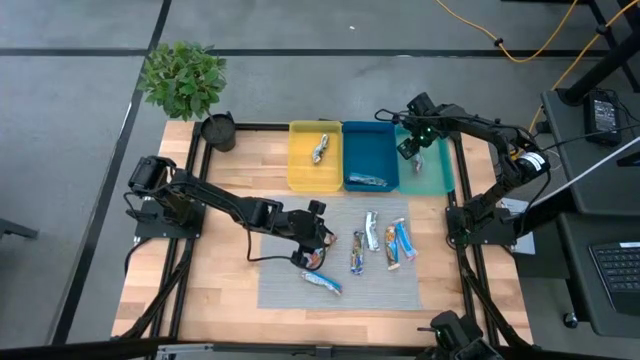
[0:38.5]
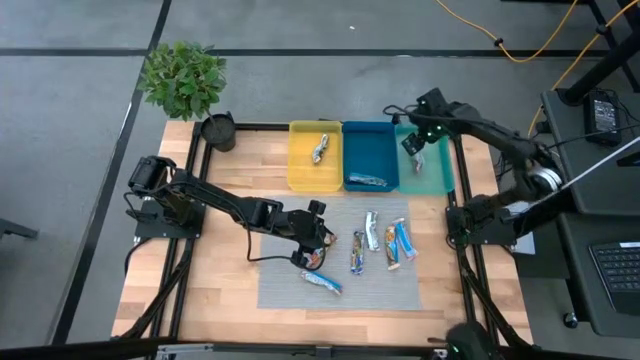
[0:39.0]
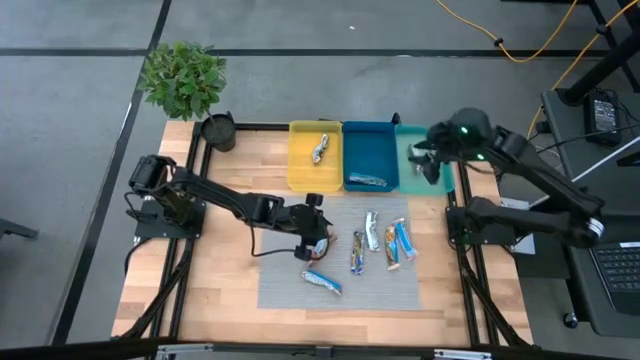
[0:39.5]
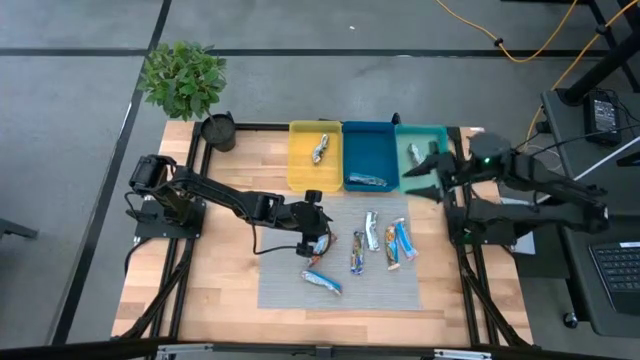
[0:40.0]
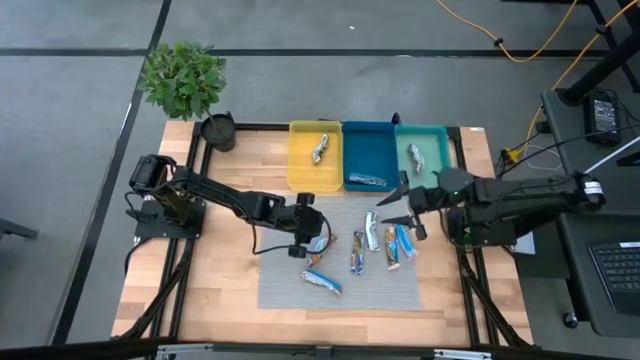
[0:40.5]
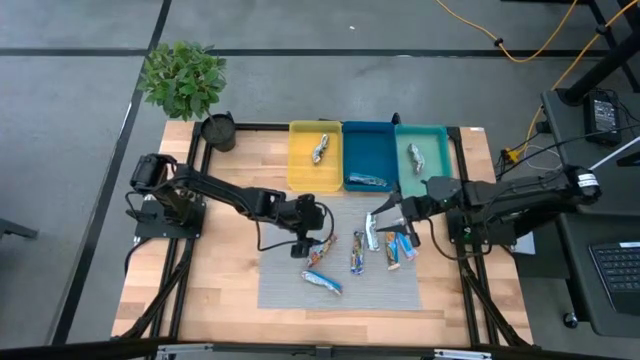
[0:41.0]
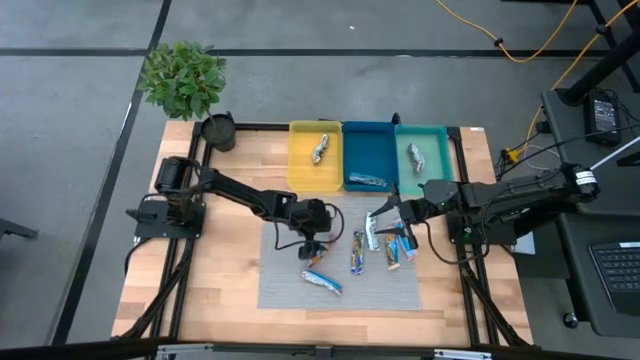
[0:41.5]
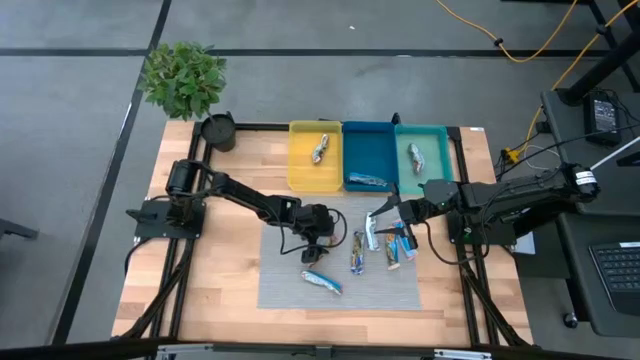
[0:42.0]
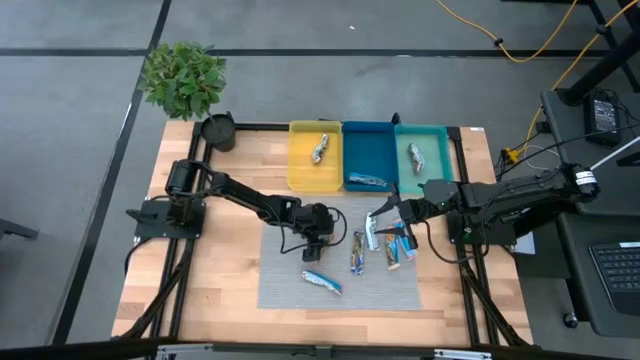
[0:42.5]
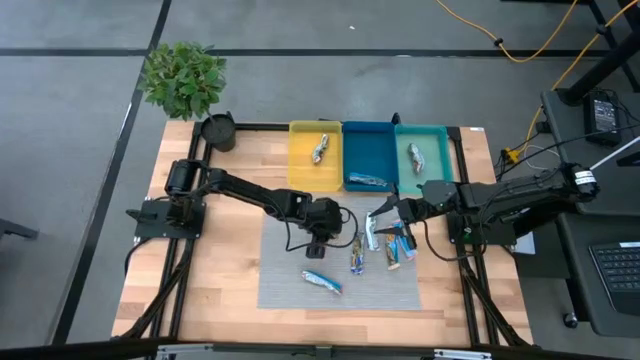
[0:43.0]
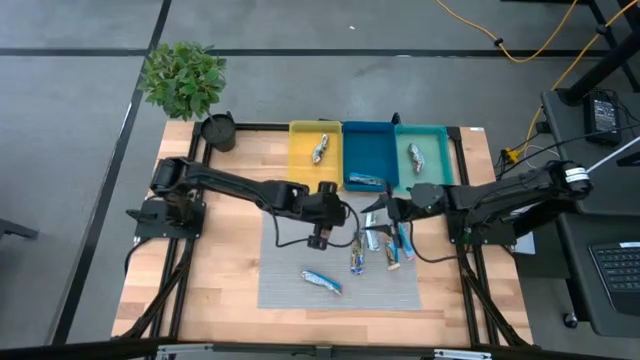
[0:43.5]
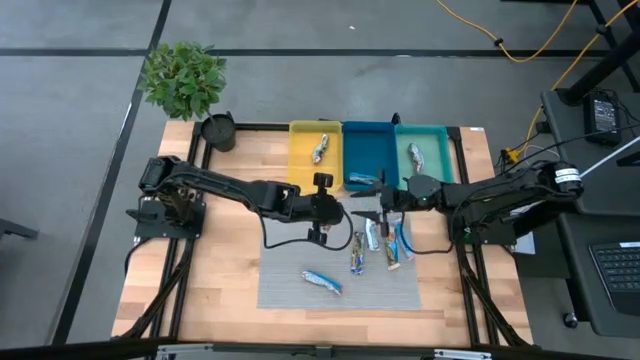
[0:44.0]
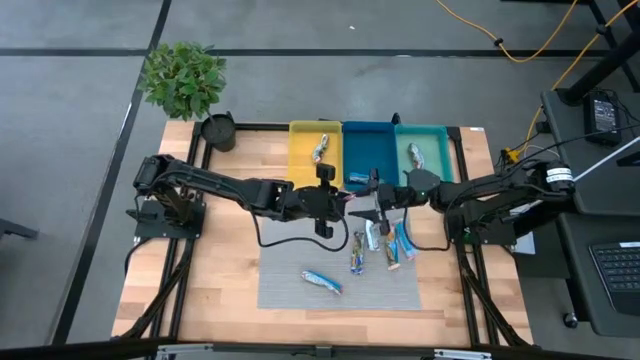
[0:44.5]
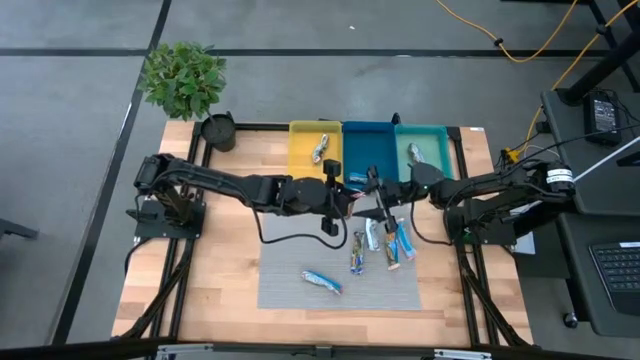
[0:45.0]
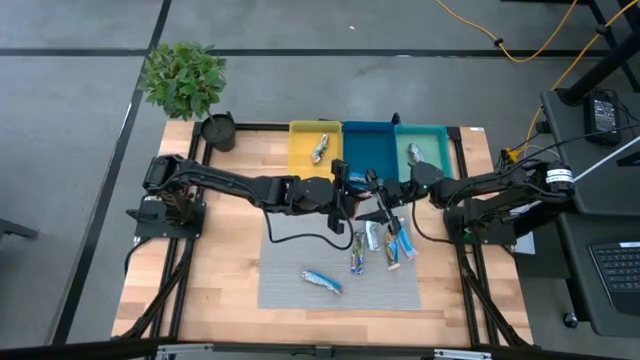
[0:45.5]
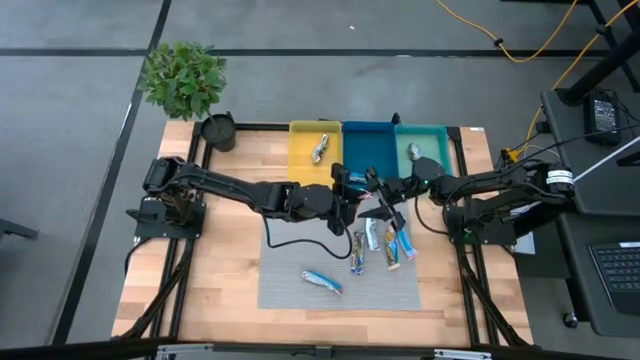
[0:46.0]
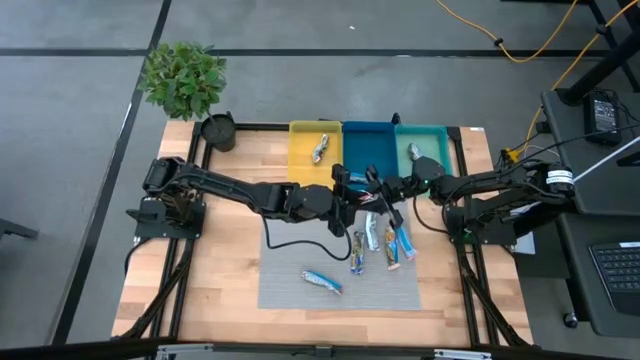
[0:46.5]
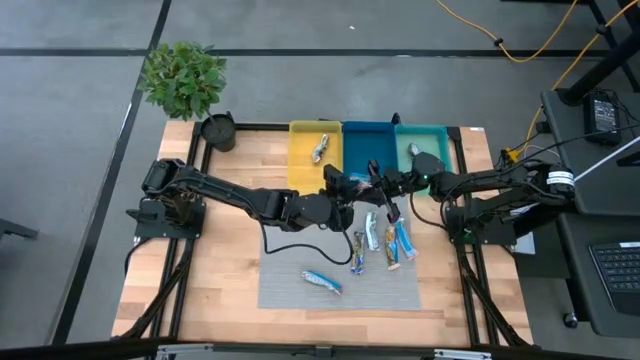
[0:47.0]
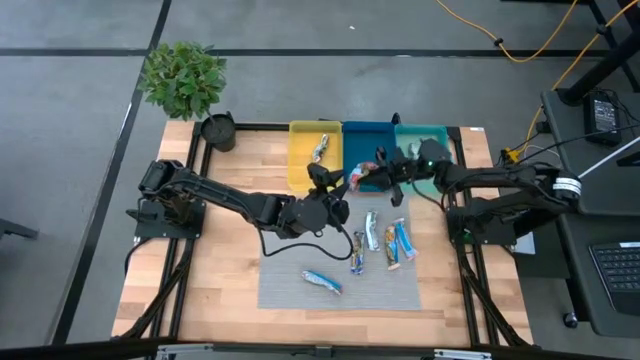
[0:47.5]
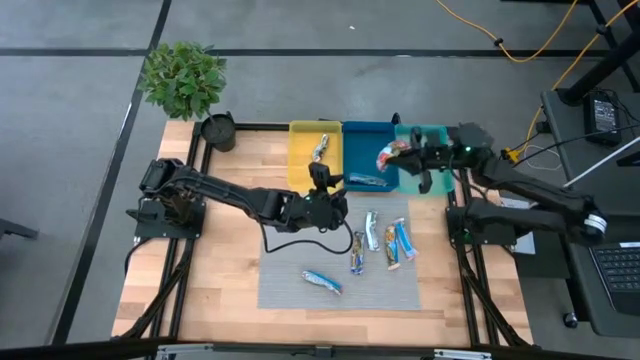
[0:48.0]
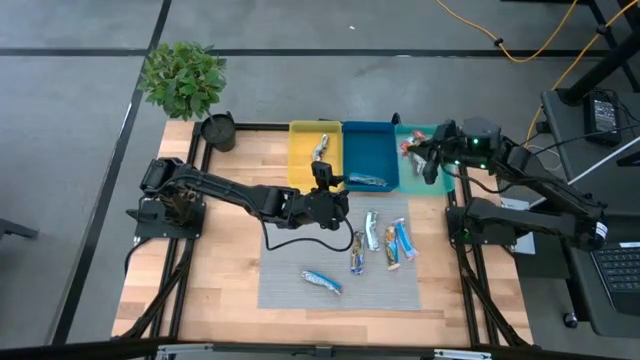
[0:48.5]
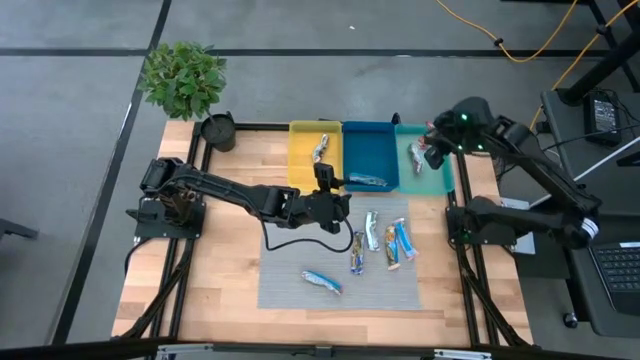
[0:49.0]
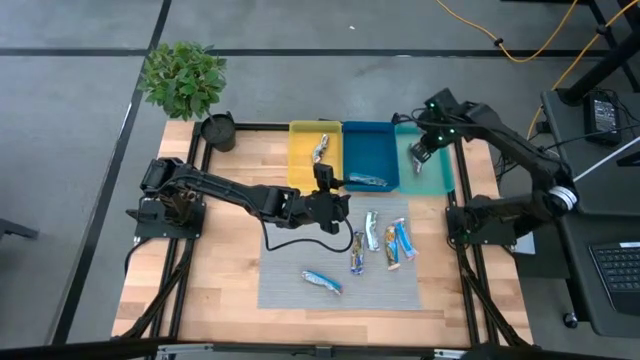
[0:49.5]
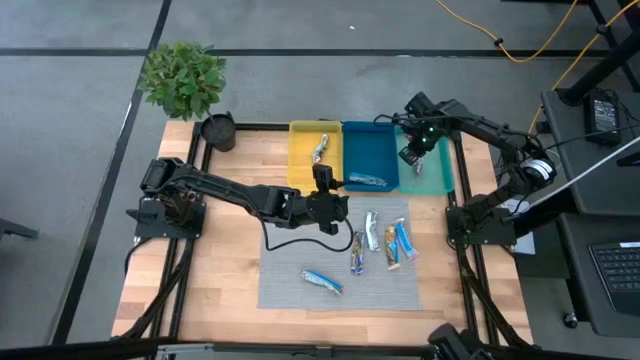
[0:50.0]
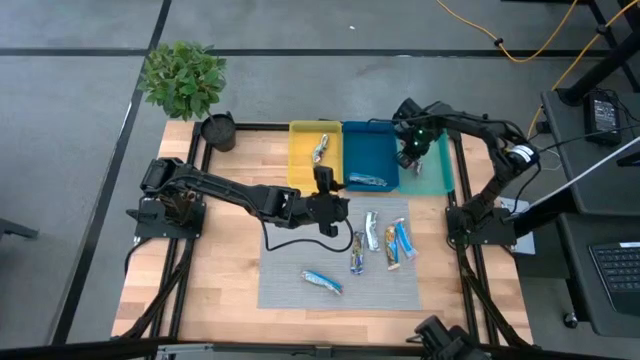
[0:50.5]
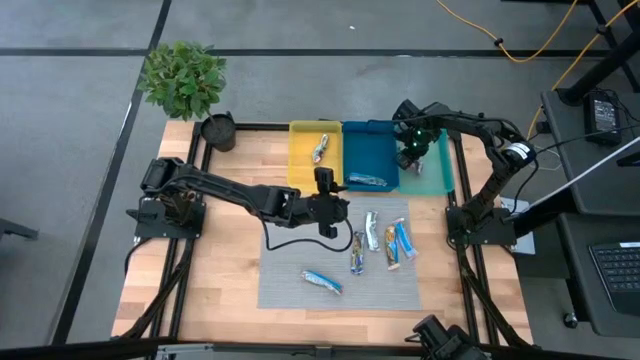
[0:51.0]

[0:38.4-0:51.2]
Task: Pick and place Granola Bars by type
Put the left red granola bar into the light blue bin

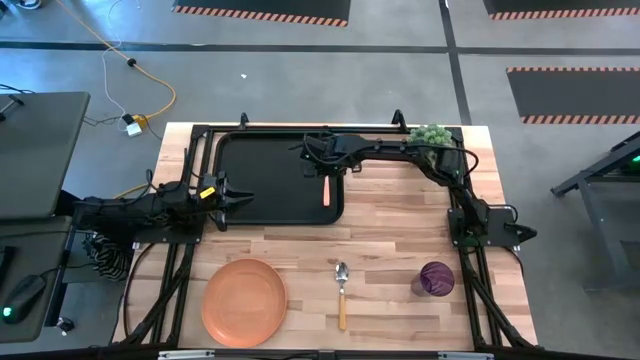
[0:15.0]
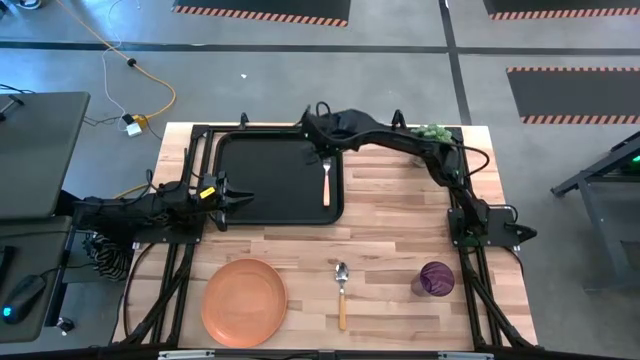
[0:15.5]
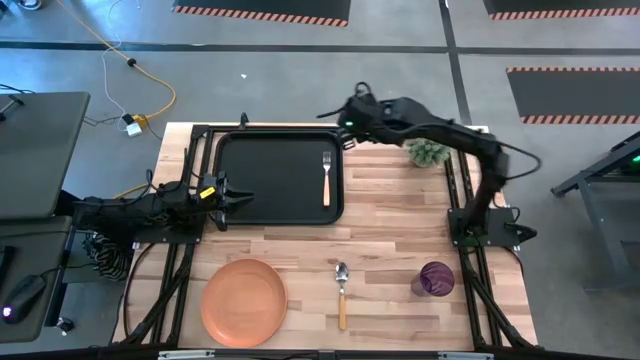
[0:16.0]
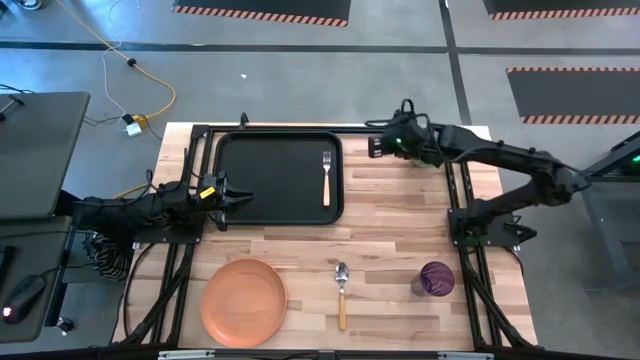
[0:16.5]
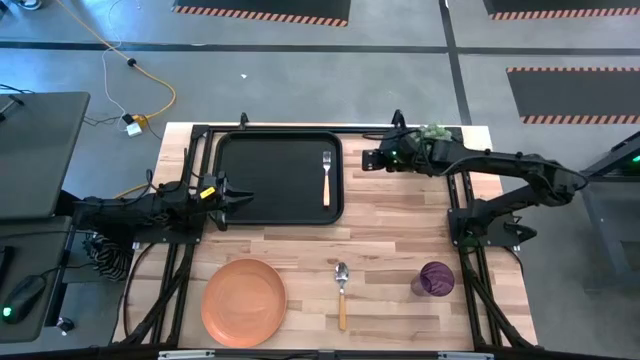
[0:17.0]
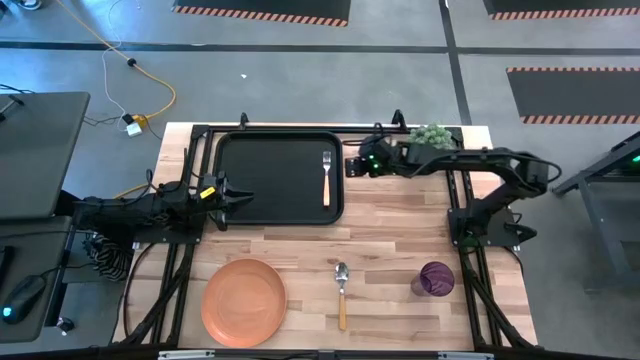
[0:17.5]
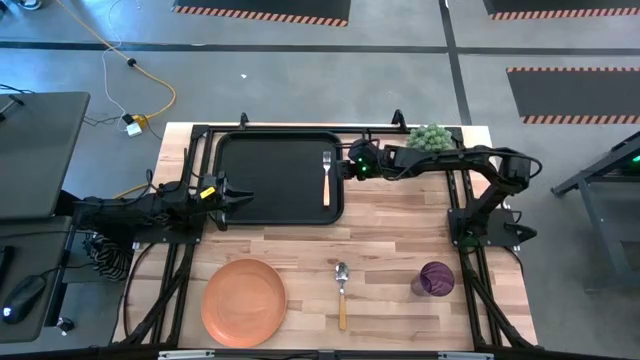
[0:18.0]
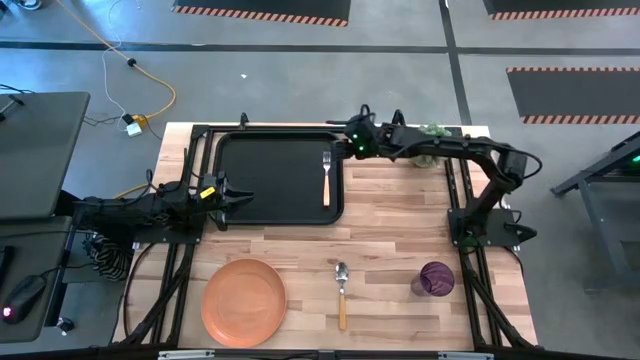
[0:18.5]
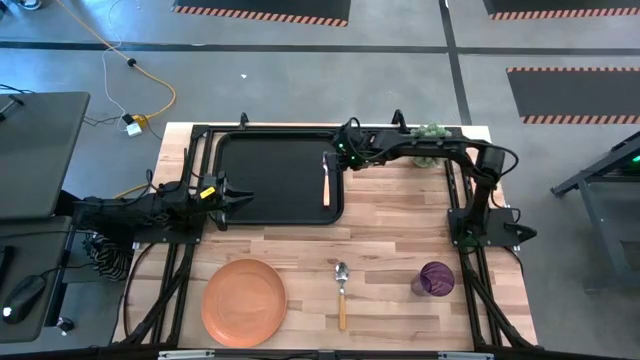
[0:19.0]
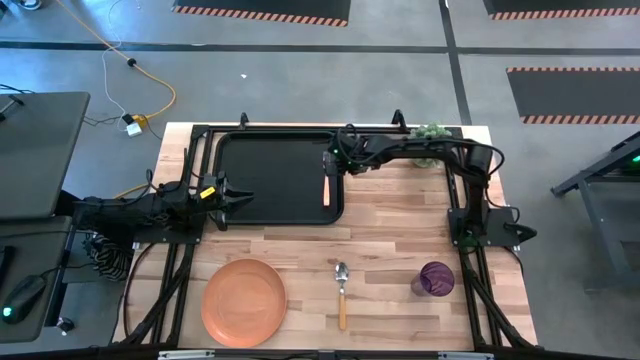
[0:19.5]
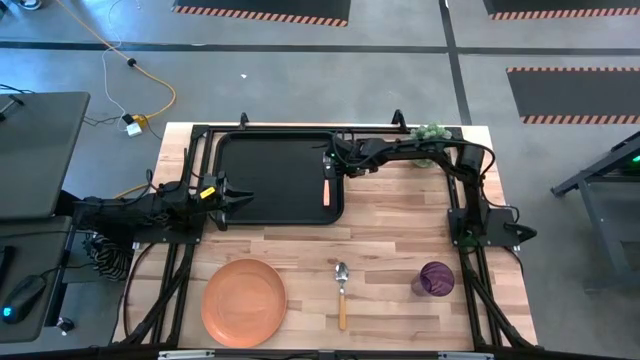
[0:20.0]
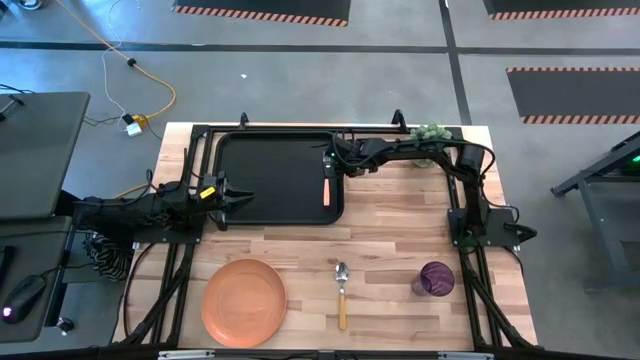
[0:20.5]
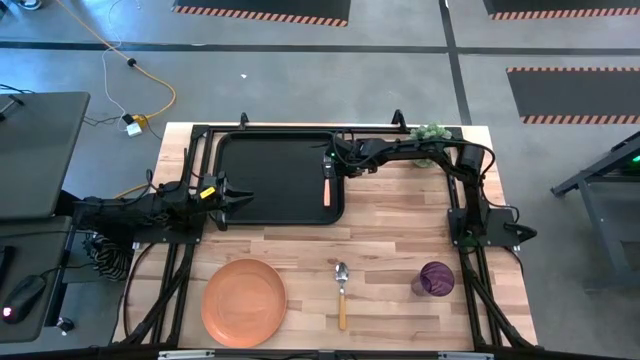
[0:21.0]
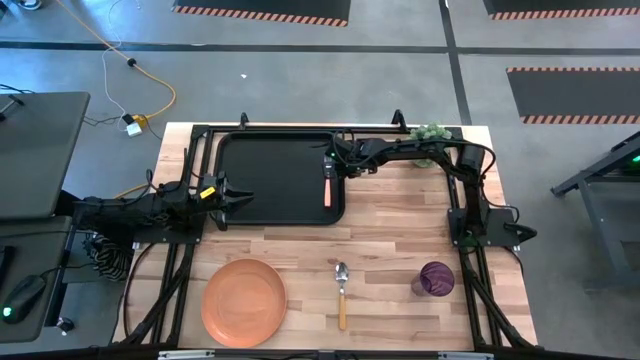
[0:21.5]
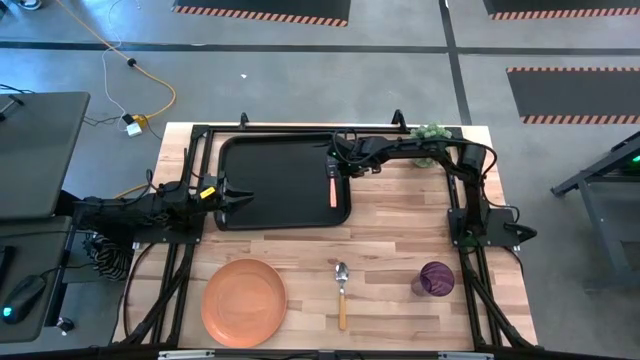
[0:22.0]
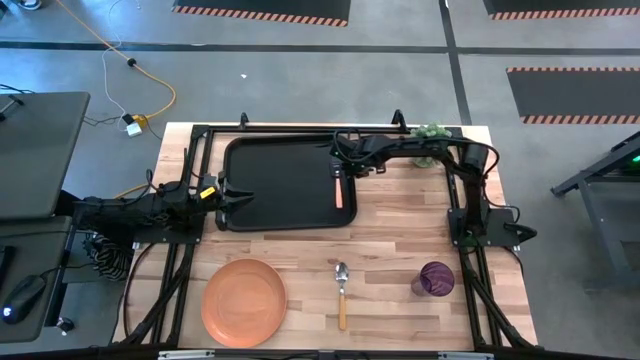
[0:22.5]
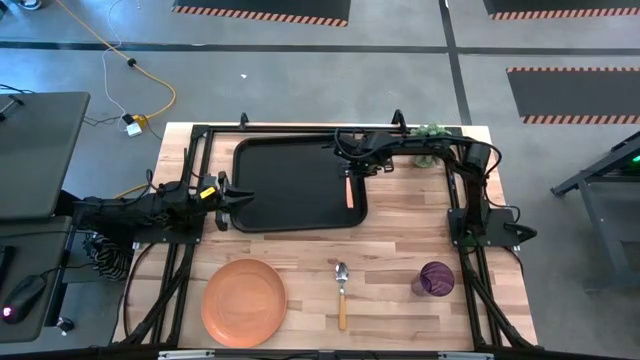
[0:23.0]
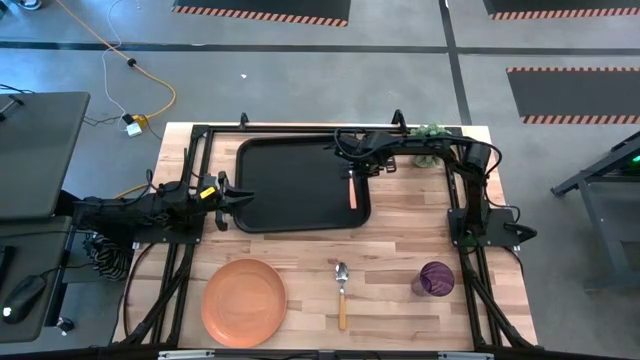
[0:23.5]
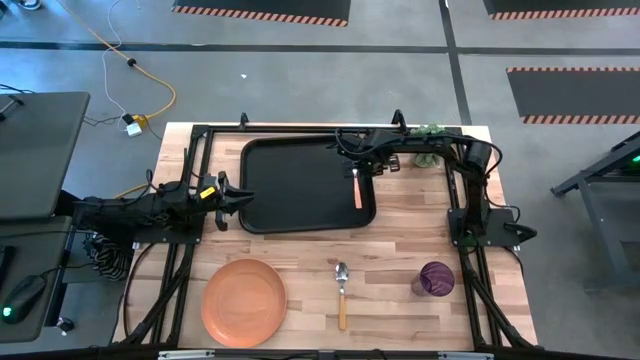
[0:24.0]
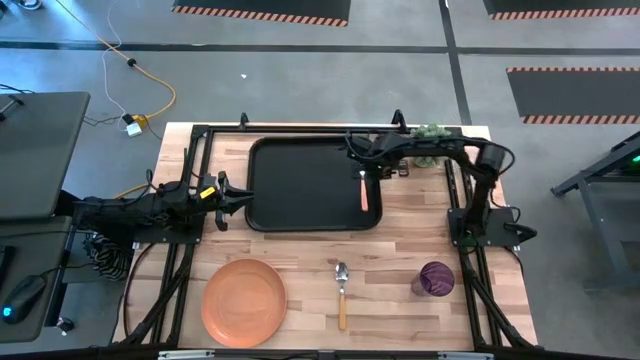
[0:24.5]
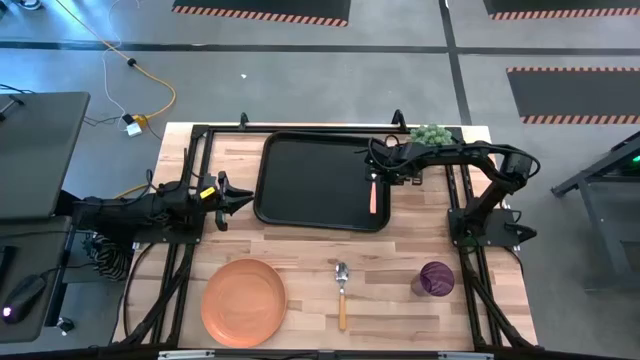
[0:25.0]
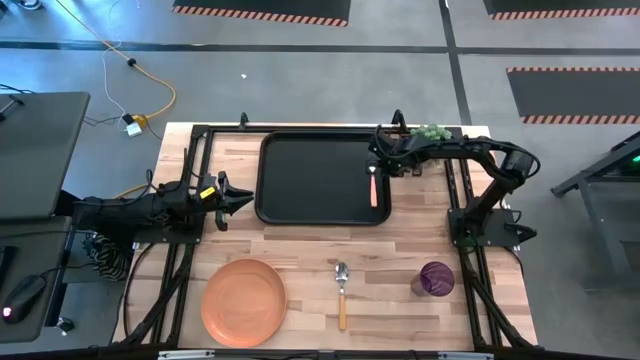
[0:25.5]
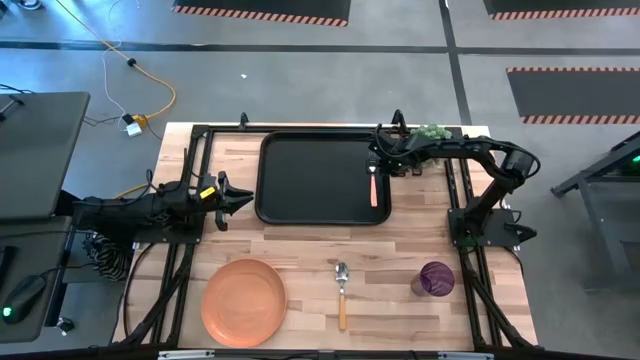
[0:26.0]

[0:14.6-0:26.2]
Task: Pick and place plate/cup/fork/spoon on tray
Move the black serving tray to the top middle of the table
